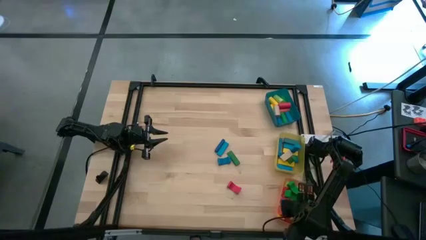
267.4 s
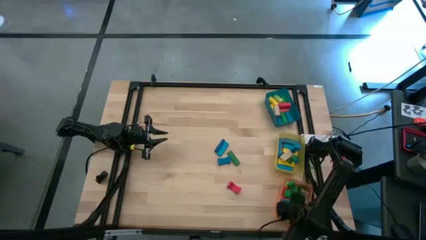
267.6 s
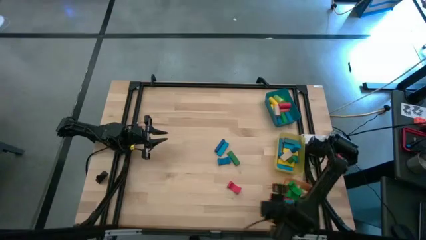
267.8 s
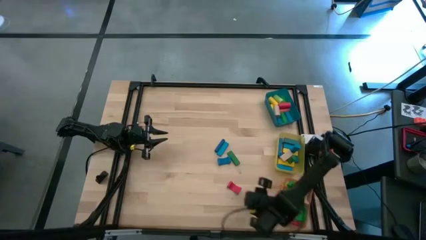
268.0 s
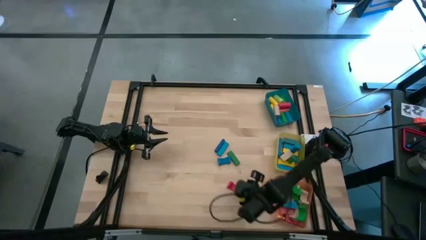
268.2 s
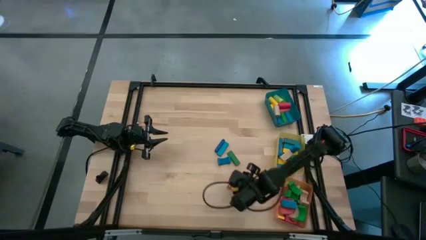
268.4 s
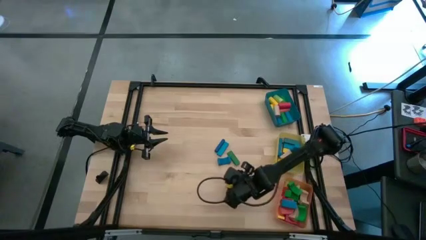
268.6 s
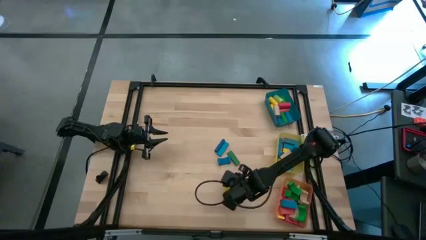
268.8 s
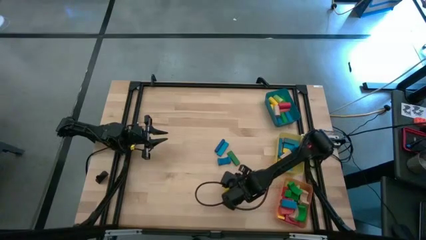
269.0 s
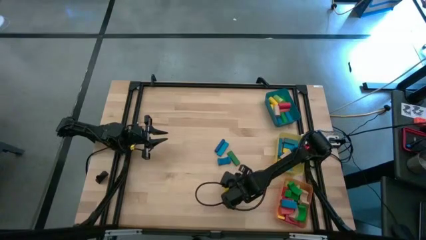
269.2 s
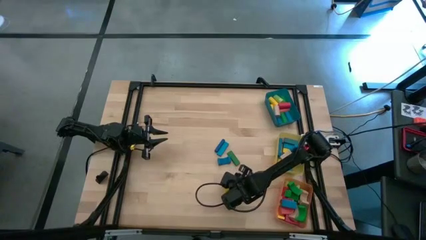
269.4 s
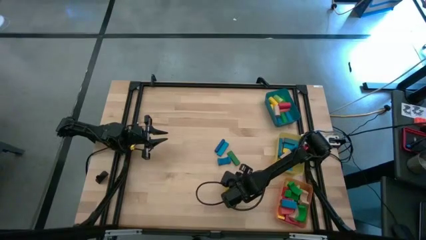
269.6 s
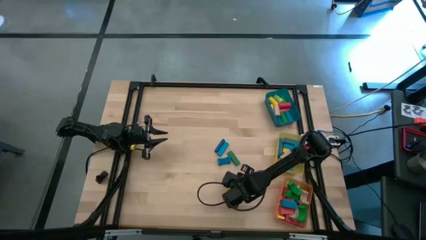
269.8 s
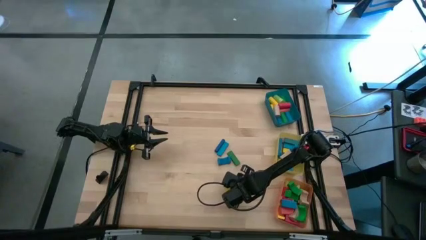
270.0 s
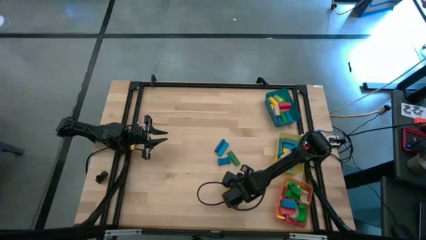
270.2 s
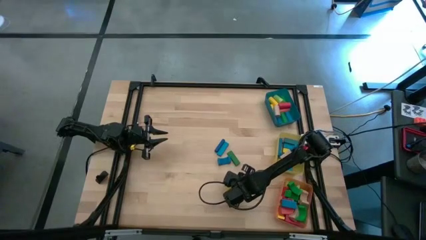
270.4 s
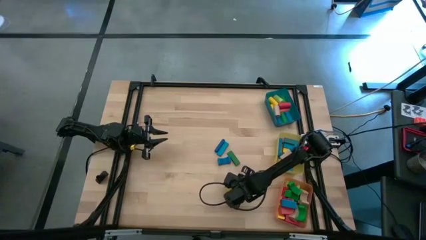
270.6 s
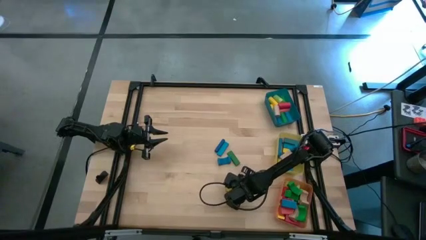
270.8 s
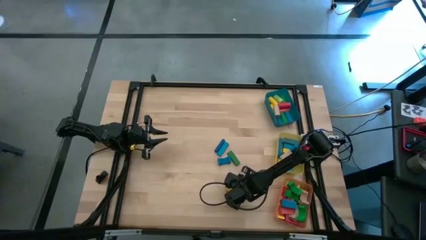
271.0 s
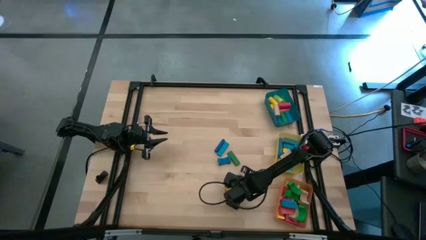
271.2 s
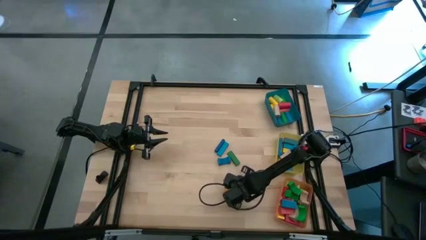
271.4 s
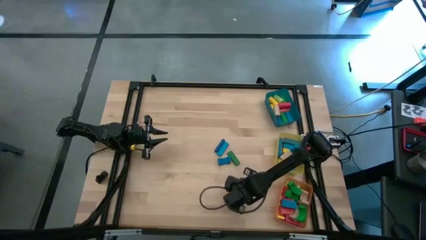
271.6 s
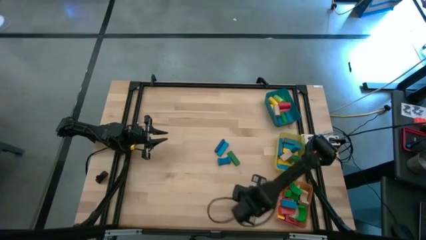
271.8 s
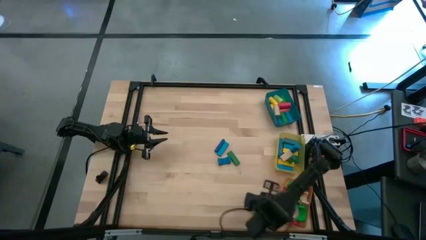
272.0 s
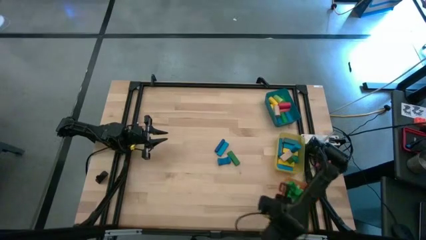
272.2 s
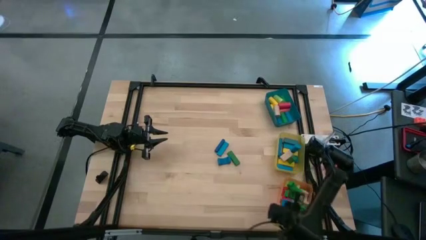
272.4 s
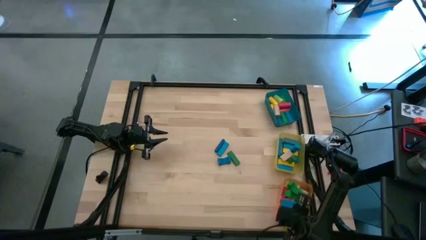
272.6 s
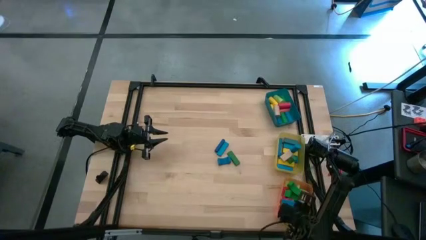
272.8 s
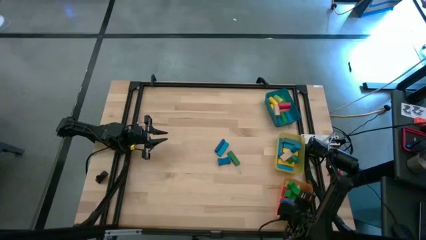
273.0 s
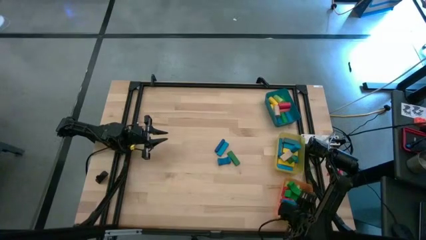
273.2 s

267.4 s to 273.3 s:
Task: Sort blocks by size
Put the red arch block into the orange bin

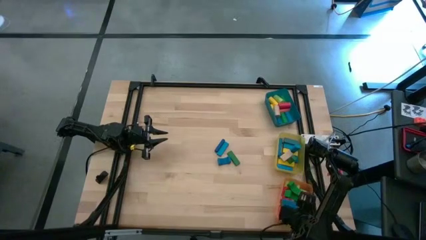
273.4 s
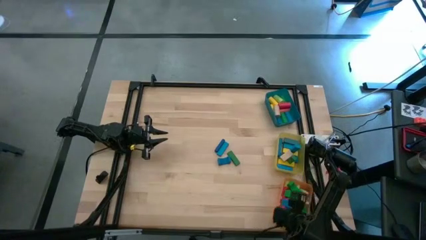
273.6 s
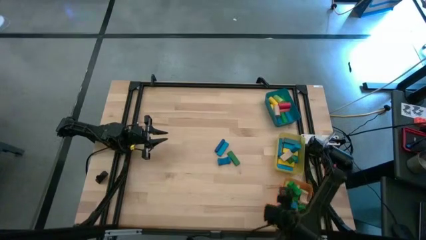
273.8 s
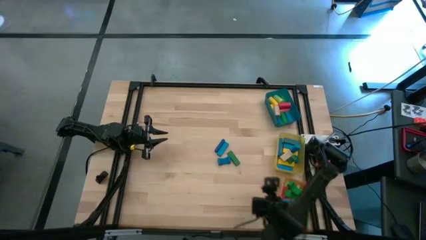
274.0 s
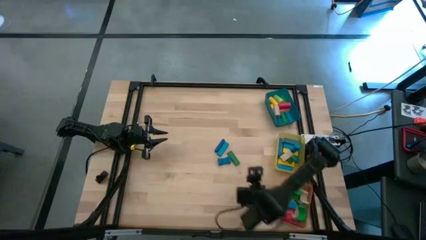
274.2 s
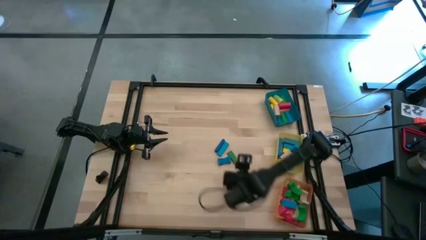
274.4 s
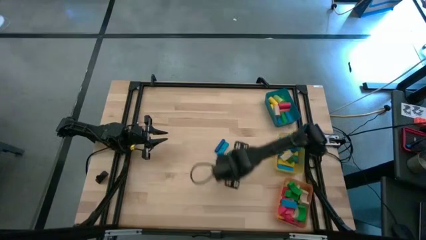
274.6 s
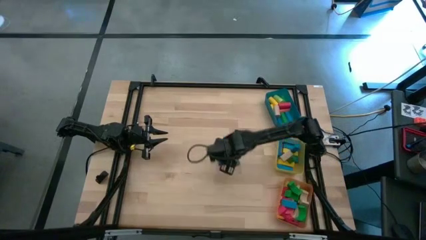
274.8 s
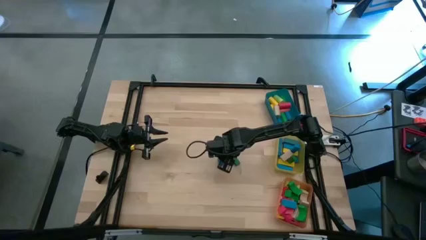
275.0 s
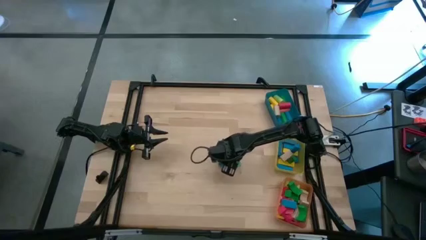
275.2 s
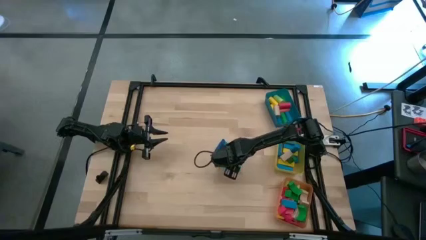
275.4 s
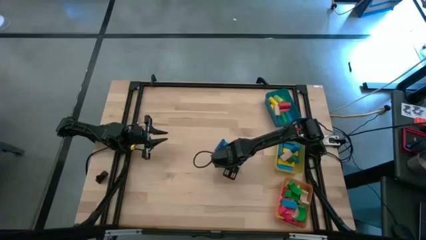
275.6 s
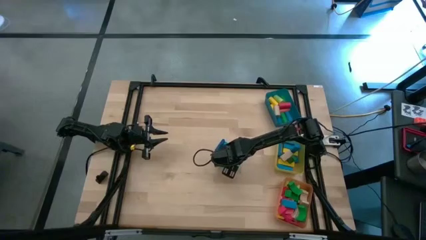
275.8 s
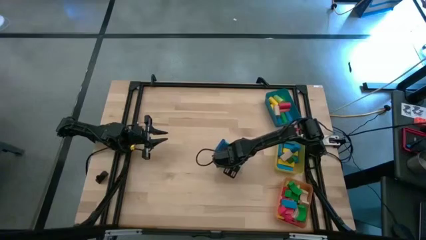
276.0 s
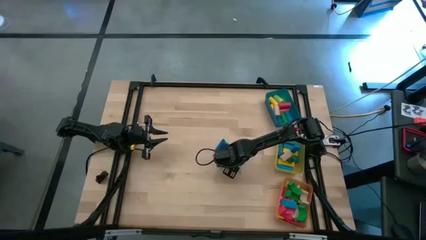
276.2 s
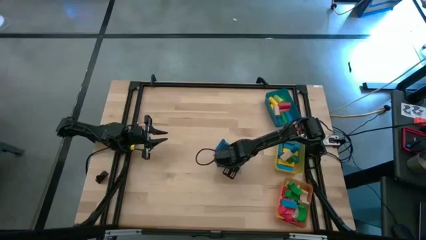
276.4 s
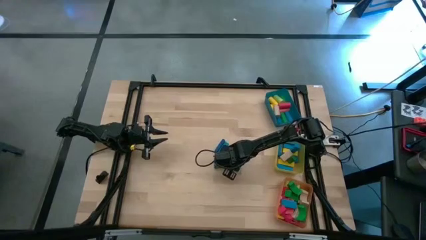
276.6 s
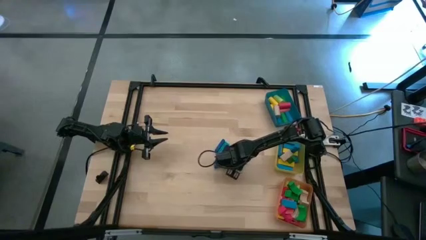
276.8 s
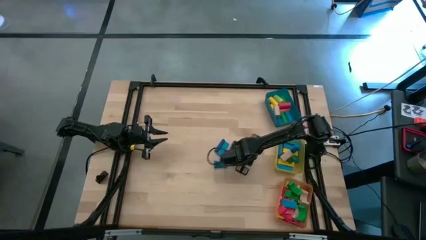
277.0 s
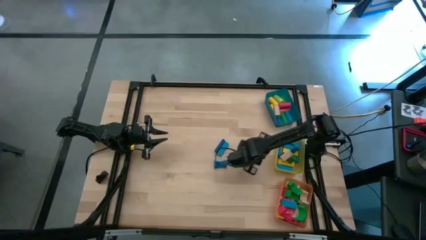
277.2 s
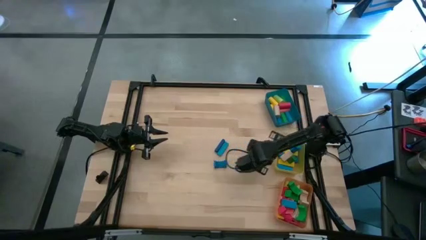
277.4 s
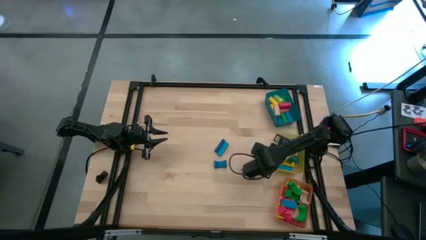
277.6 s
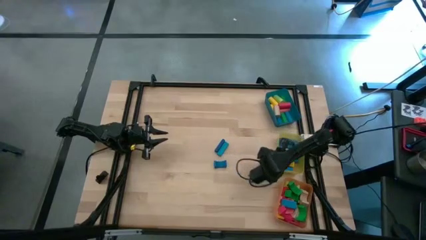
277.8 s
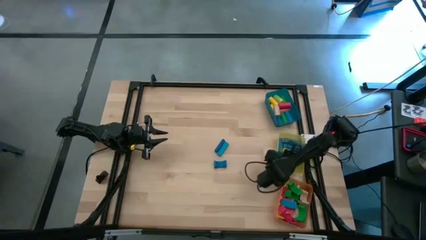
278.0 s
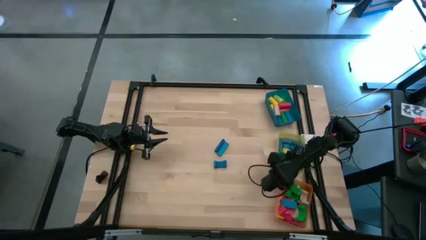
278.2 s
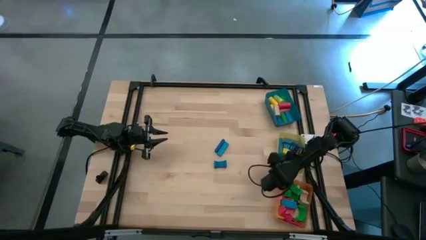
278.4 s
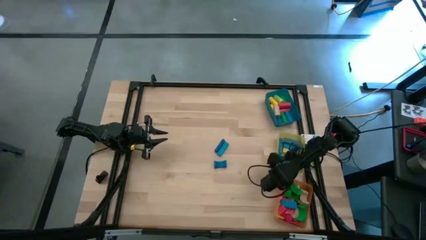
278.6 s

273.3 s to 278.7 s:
Put the green rectangular block into the yellow bin

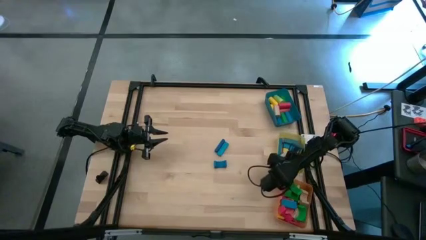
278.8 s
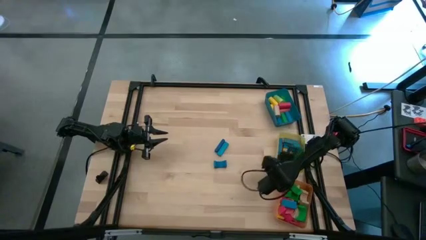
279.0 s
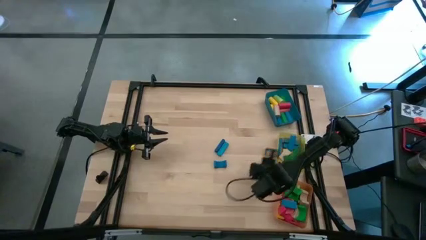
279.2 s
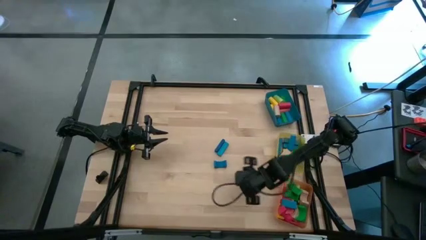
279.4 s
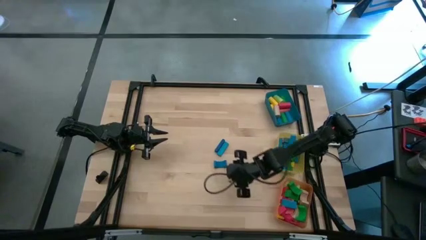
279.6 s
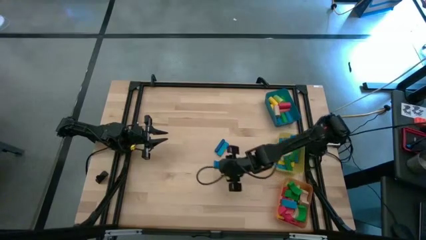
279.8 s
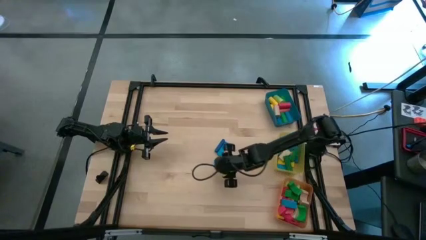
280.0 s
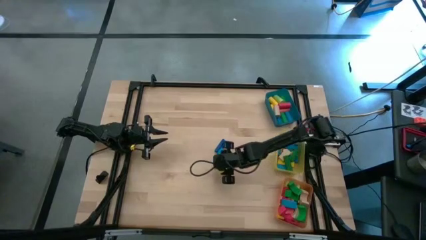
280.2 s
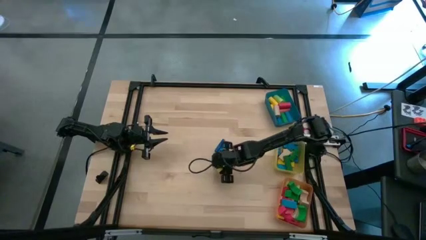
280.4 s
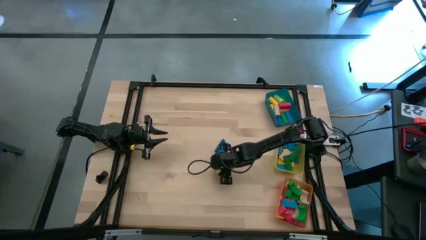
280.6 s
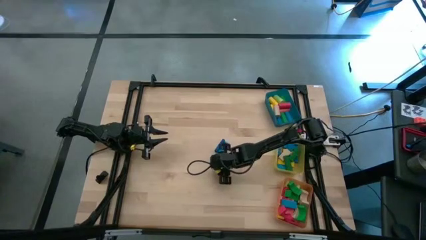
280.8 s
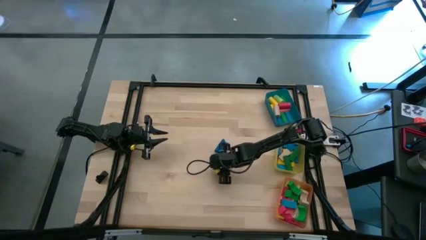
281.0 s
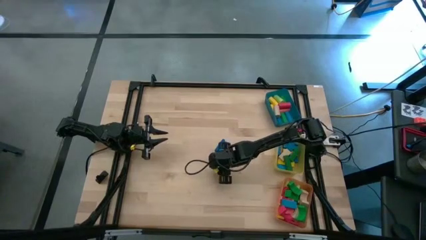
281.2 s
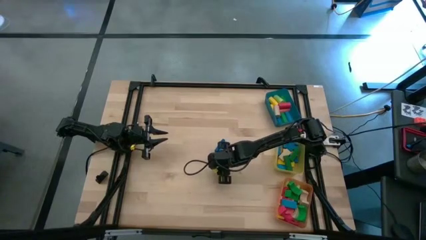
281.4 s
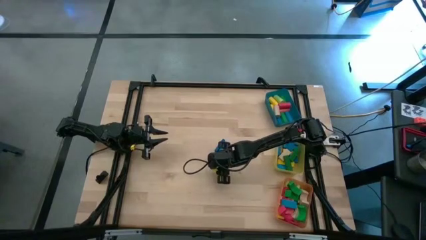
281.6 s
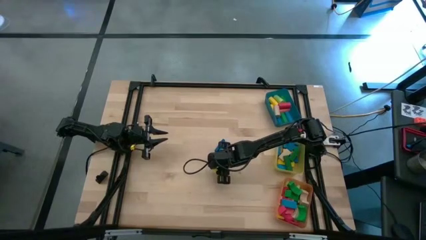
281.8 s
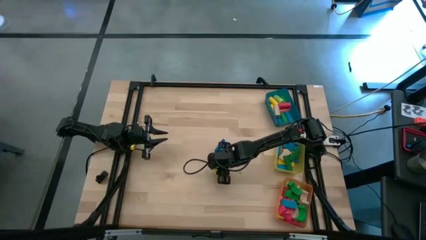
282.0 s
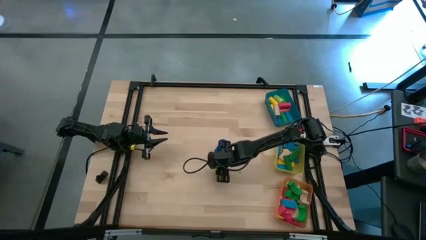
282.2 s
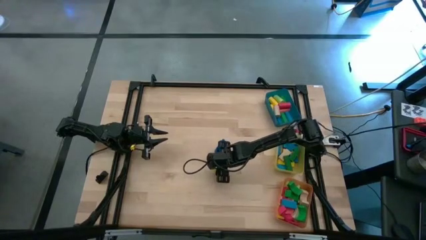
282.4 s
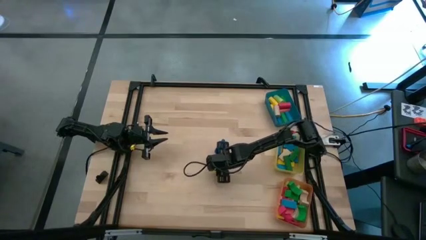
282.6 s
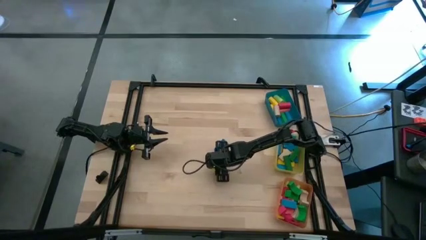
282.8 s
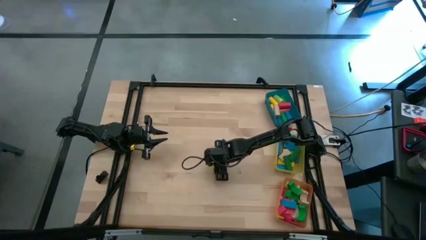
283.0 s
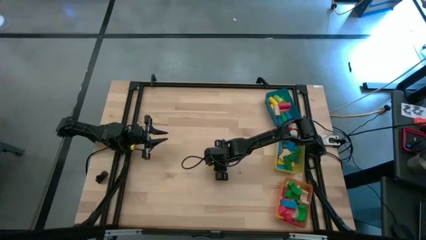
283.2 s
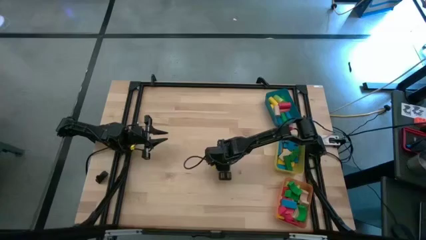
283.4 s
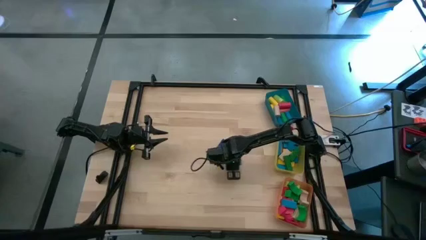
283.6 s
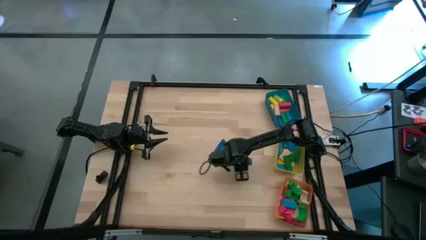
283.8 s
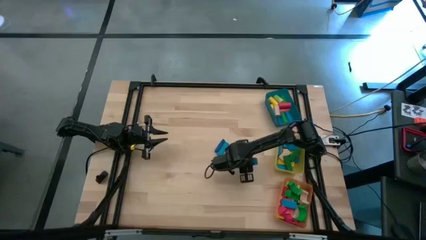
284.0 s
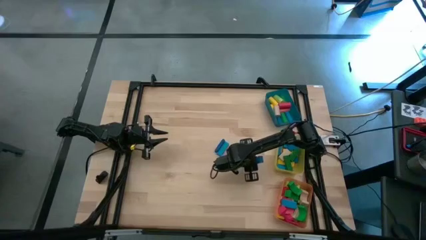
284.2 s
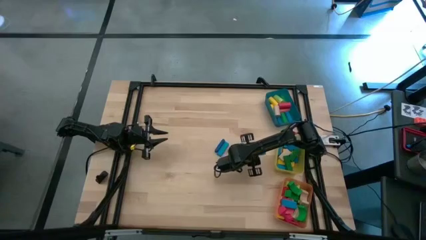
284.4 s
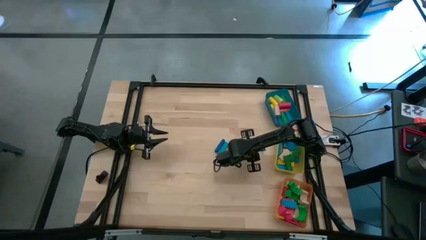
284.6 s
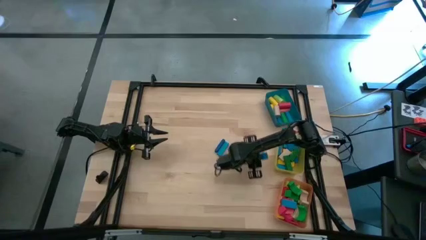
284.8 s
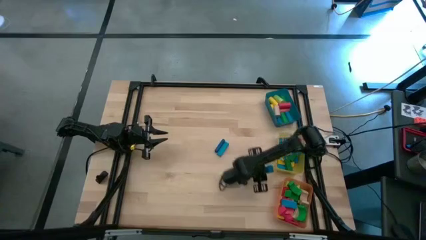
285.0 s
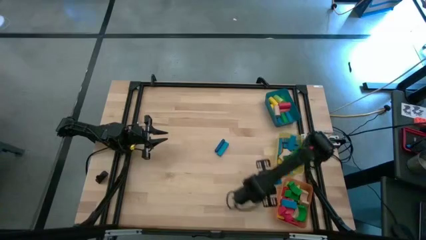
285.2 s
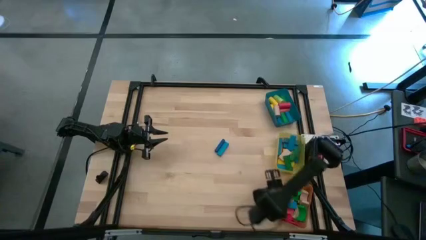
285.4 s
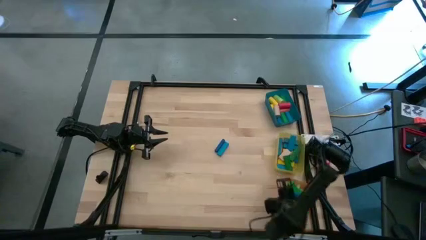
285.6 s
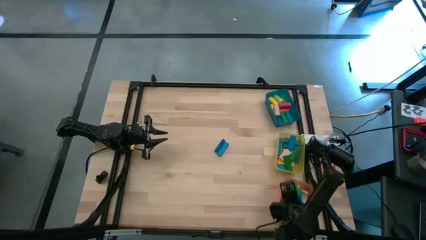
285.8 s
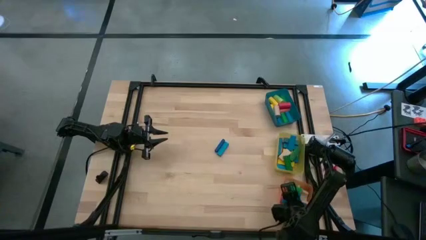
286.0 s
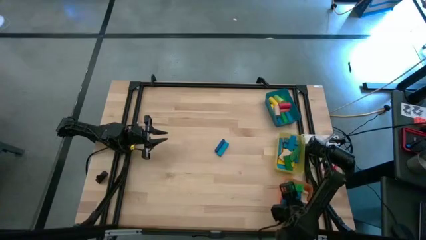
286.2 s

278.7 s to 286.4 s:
Put the blue arch block into the orange bin
